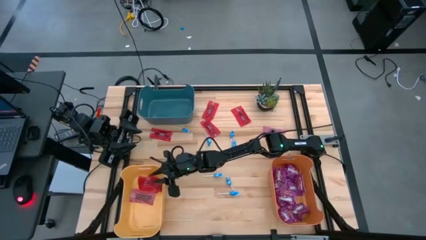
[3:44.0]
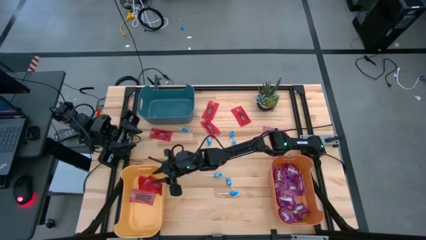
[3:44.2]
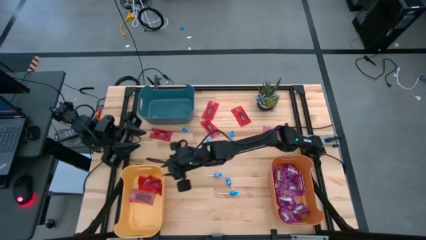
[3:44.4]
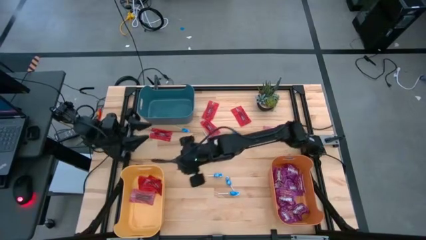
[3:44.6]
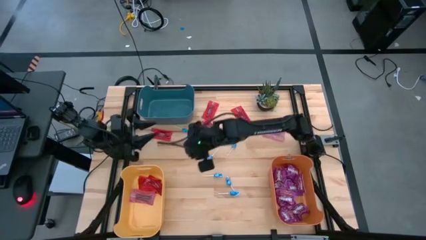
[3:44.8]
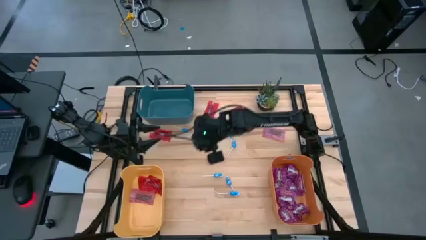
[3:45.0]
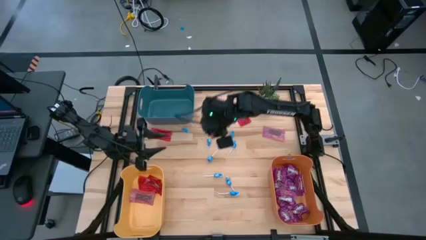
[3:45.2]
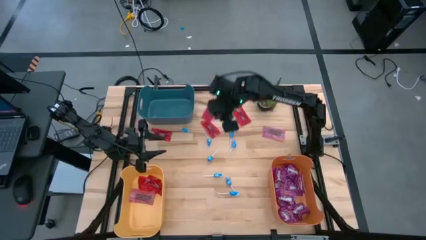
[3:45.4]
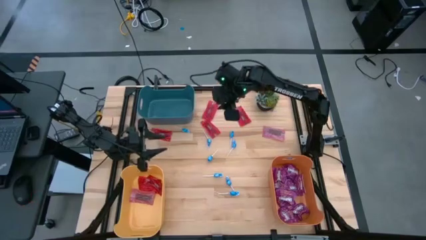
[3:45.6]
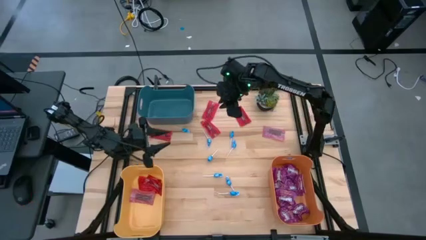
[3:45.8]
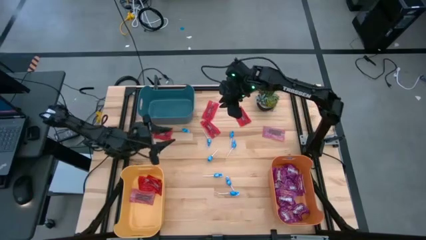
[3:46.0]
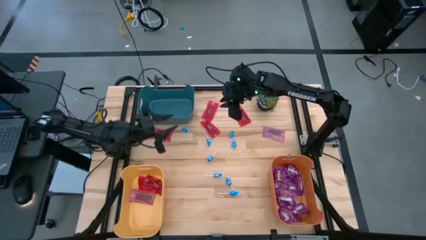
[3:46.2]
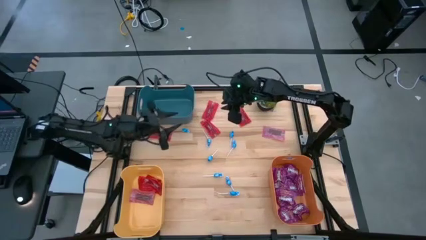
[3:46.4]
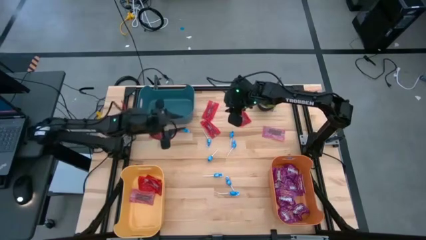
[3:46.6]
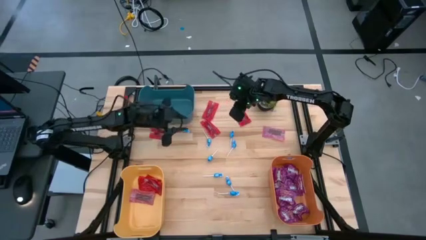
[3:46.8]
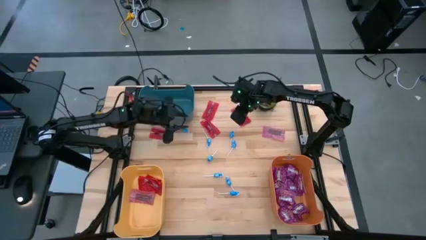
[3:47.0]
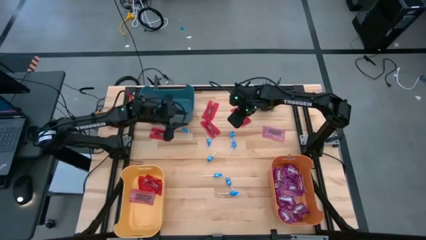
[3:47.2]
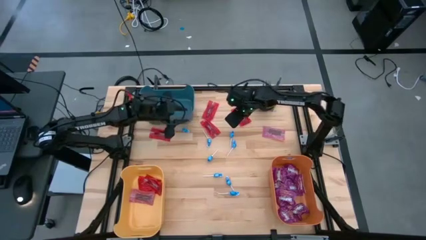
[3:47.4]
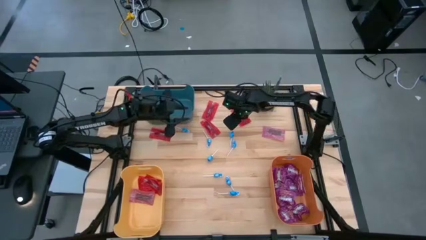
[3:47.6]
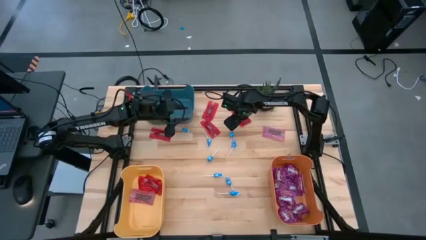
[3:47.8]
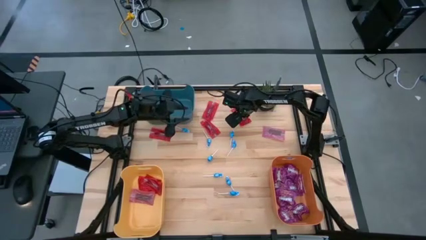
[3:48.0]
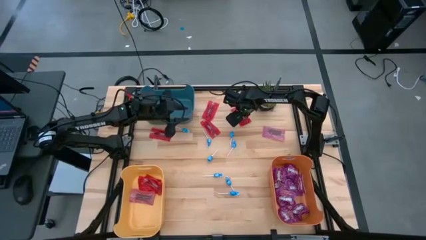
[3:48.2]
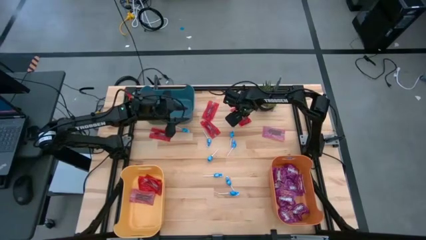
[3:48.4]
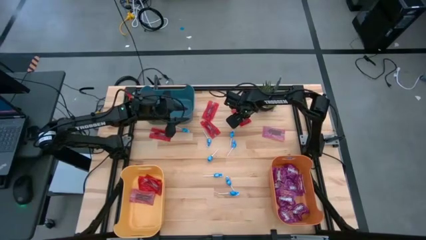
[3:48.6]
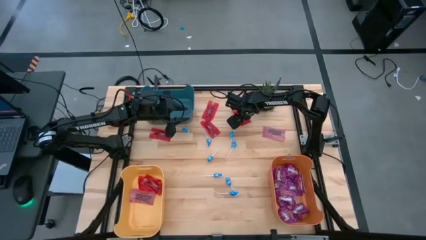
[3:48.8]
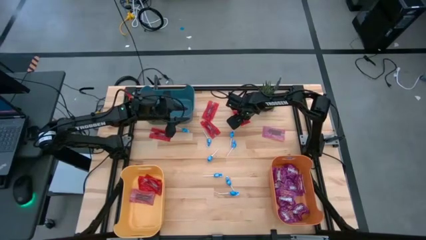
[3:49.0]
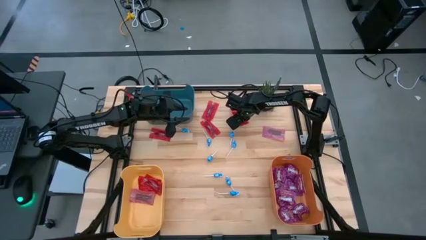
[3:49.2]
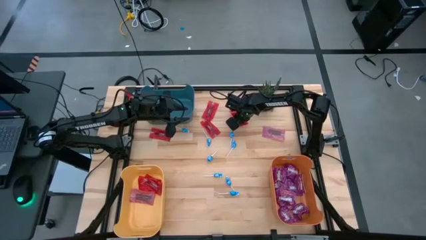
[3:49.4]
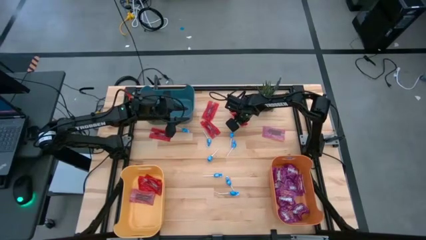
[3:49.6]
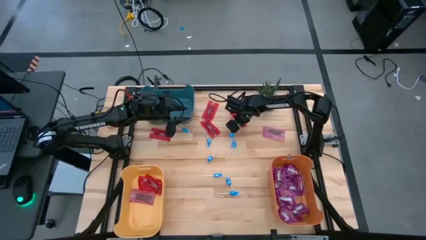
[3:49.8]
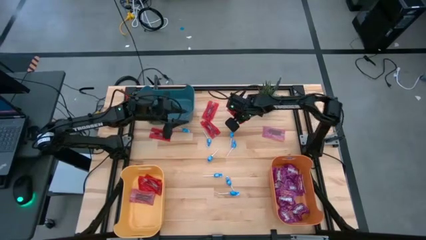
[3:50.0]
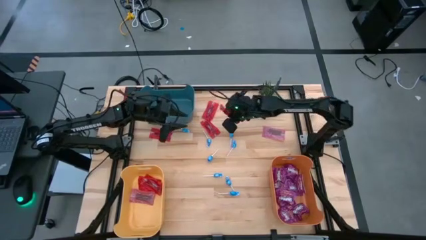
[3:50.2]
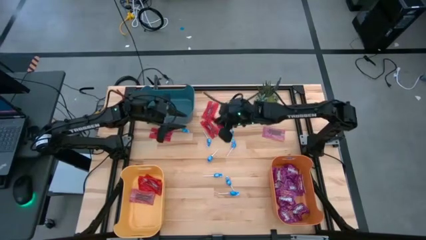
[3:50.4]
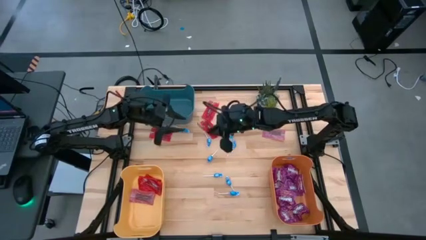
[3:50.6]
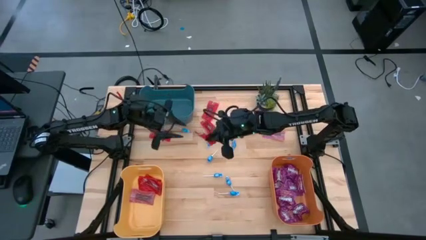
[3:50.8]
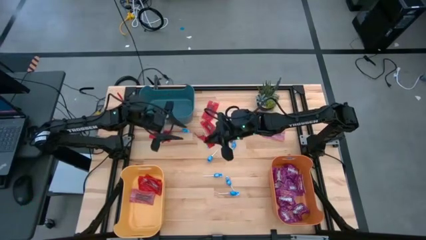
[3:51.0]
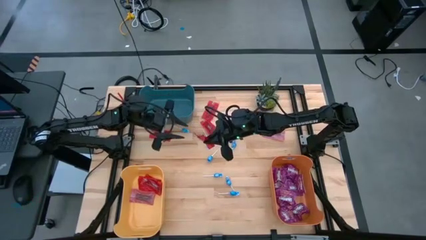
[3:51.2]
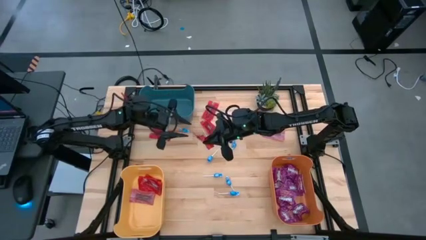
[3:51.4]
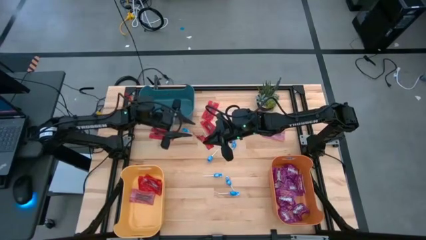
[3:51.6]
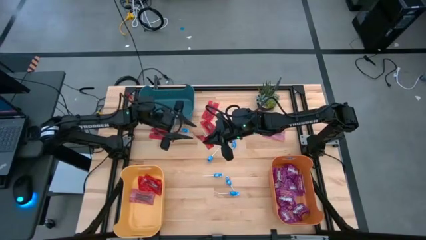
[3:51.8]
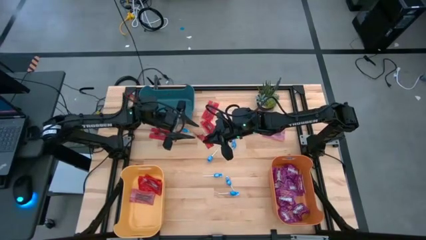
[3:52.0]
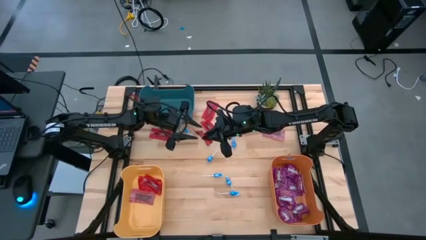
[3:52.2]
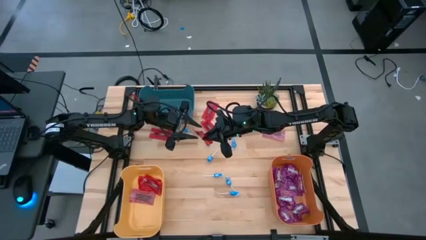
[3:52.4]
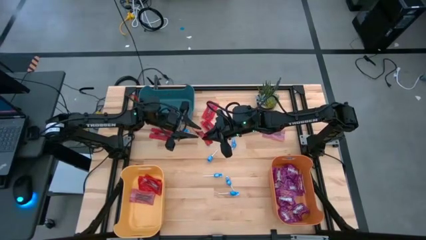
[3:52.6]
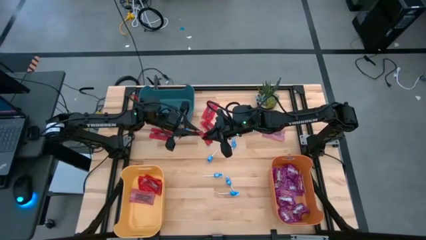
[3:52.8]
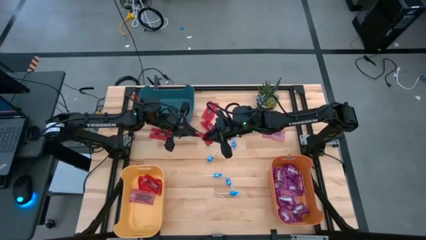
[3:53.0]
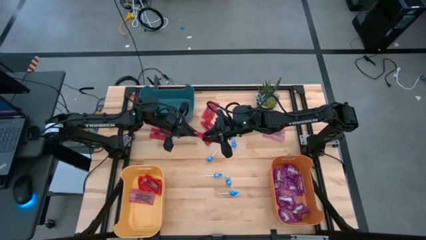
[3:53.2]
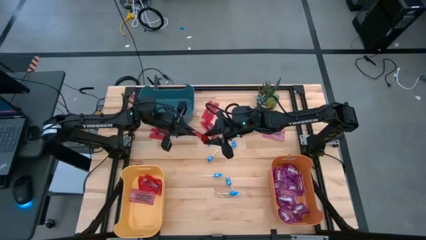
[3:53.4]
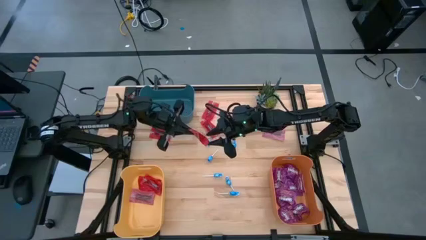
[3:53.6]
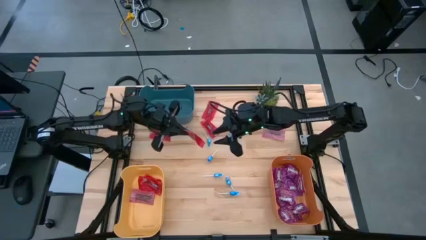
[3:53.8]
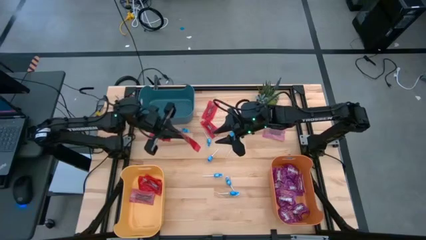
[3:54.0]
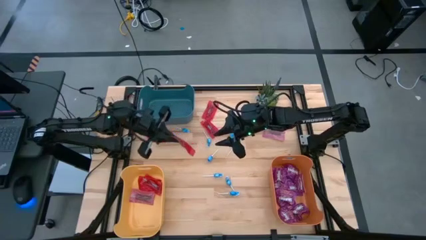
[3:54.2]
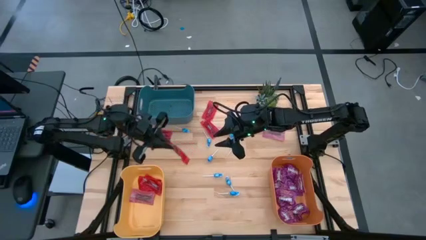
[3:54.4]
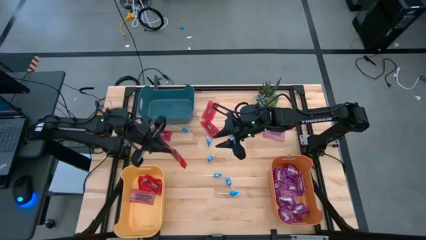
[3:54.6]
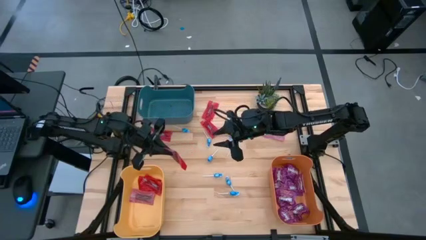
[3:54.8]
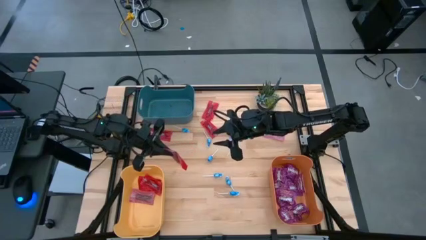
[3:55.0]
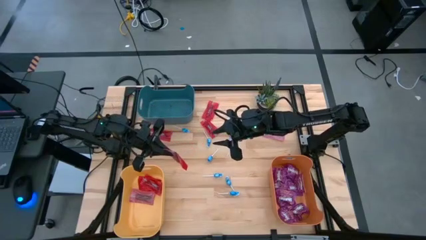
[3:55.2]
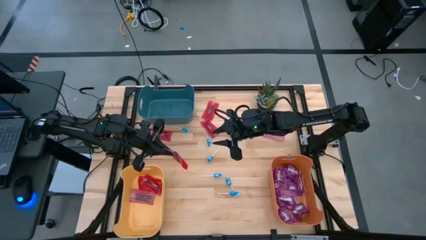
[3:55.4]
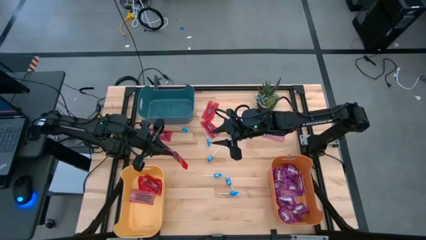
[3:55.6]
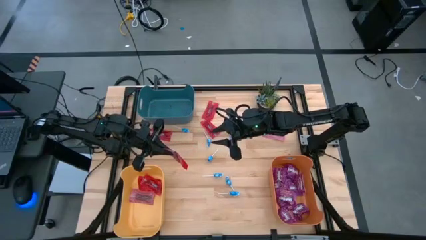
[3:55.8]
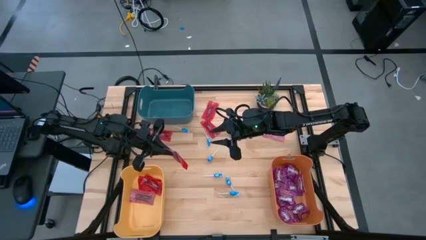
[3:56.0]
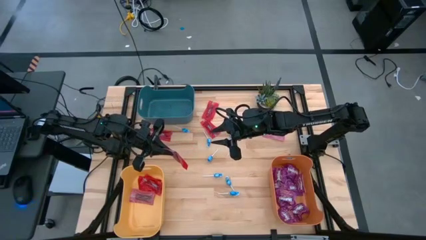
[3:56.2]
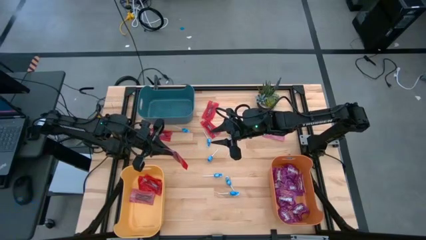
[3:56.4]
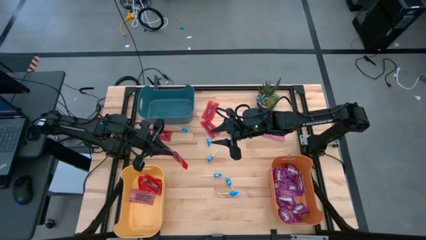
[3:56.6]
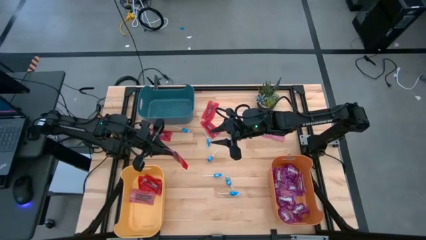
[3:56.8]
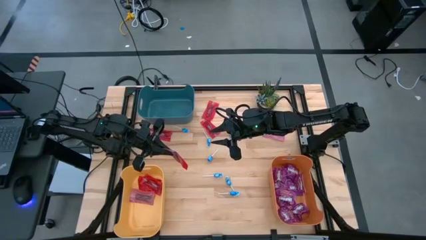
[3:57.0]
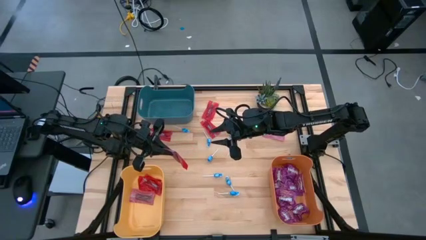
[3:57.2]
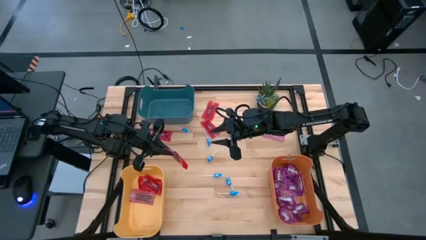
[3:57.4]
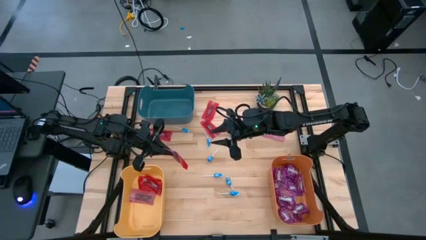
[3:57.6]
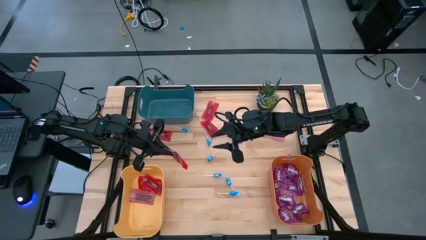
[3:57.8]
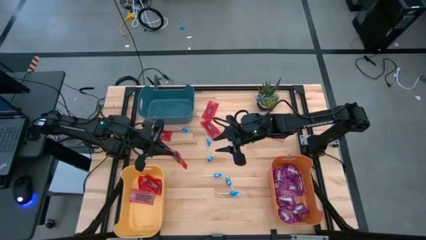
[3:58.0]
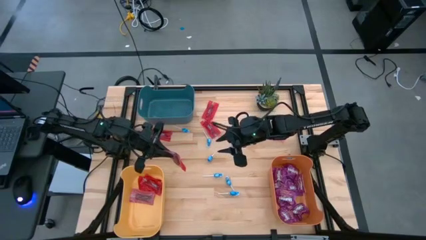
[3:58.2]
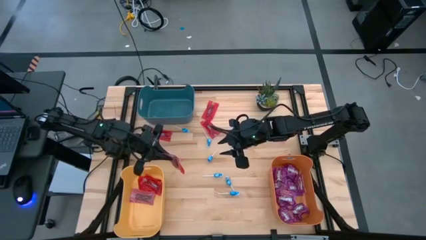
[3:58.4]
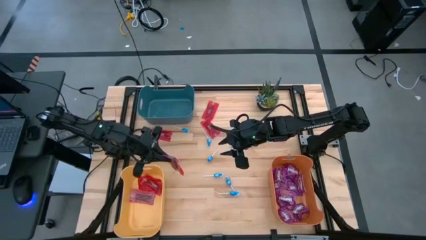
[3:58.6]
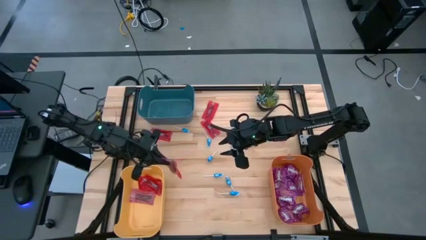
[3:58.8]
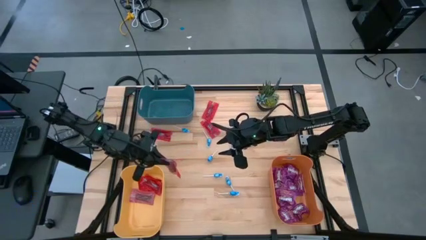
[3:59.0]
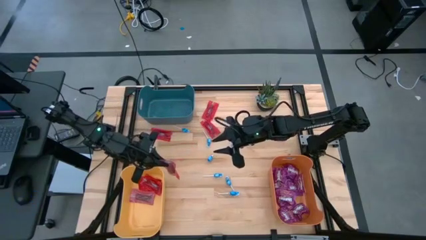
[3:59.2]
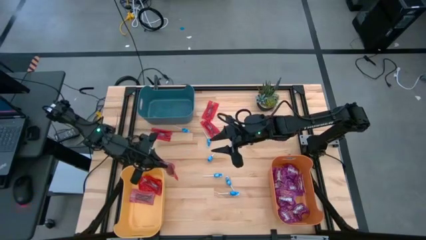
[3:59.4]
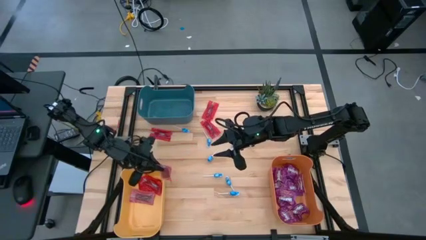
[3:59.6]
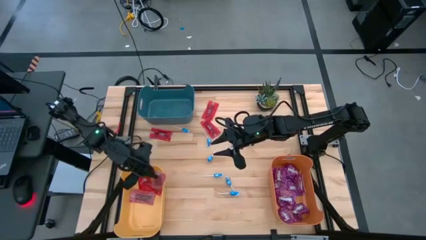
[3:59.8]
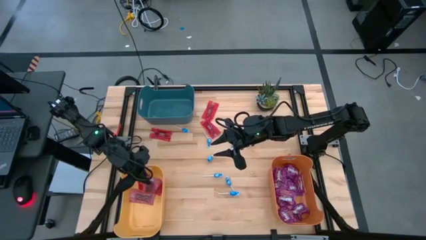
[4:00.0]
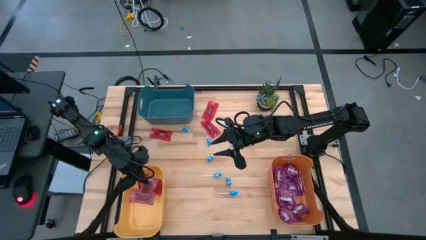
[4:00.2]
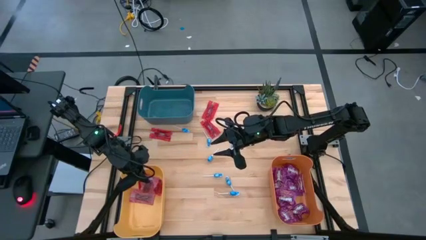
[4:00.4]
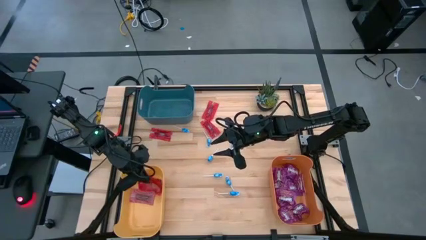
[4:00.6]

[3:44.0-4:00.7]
Task: Sort candy
Put the red candy into the yellow bin

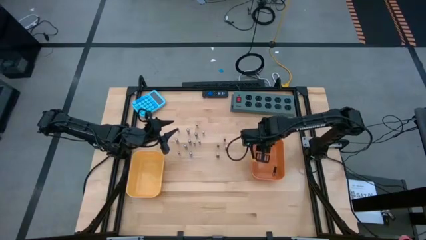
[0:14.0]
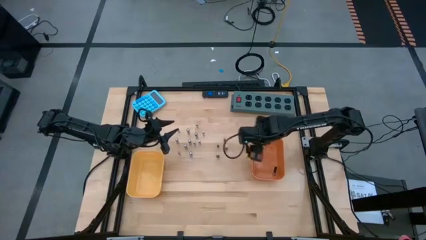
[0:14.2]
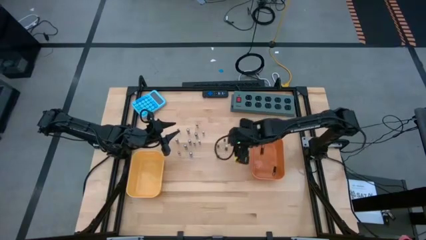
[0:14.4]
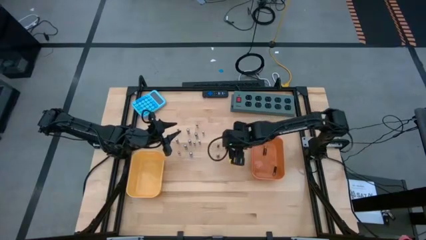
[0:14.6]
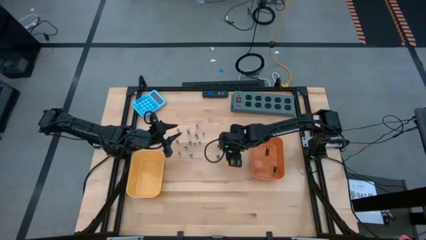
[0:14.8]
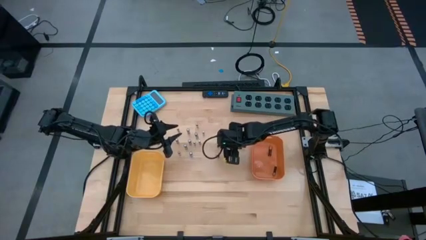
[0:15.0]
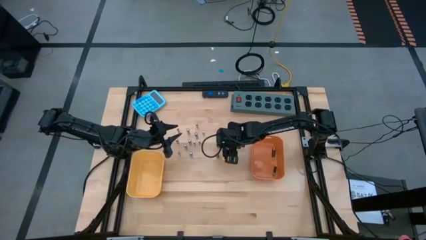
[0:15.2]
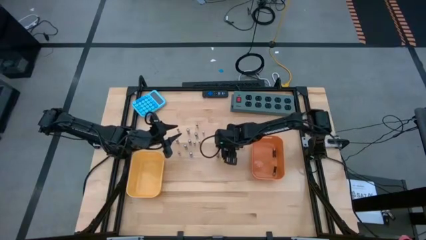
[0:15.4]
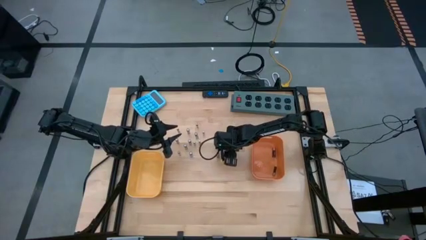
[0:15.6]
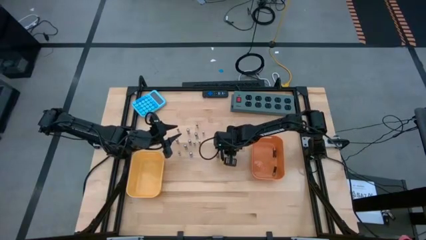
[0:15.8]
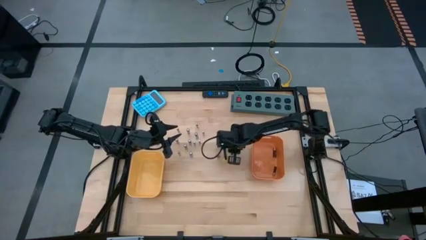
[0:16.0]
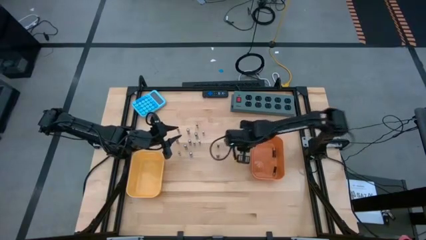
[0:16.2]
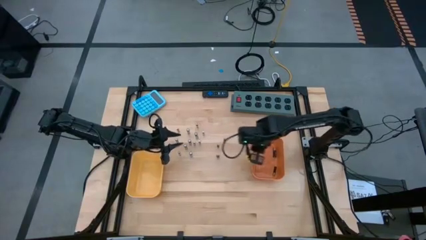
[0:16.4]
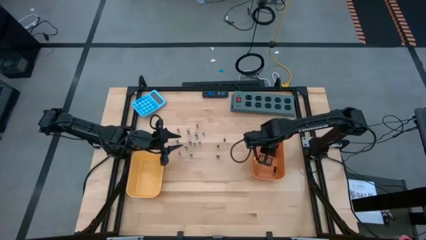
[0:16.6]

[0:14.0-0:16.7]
Task: Sort batteries
Put the brown battery into the orange bin
